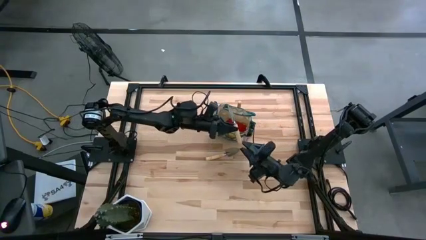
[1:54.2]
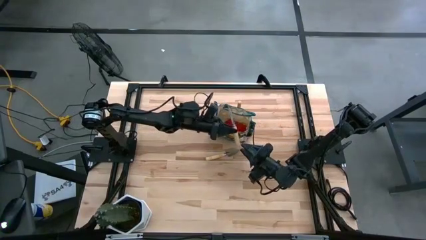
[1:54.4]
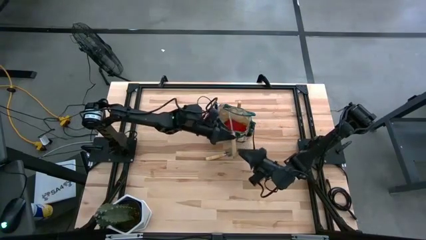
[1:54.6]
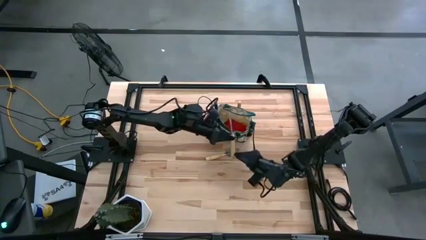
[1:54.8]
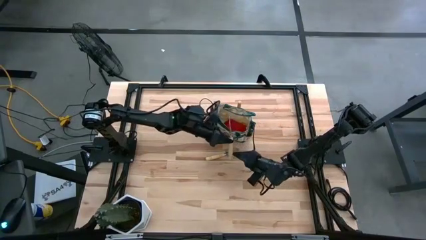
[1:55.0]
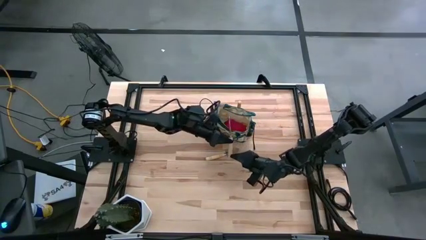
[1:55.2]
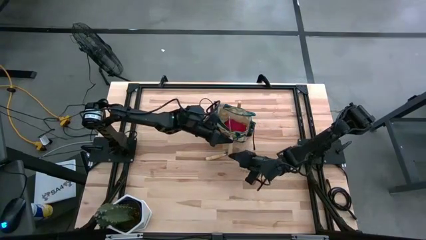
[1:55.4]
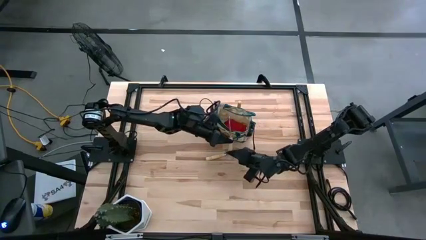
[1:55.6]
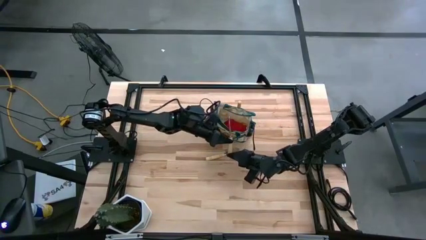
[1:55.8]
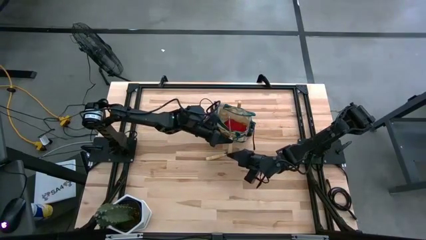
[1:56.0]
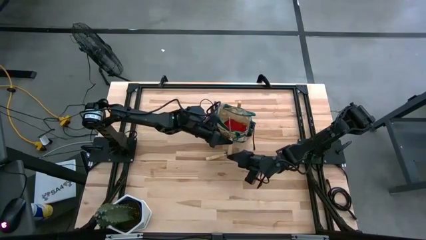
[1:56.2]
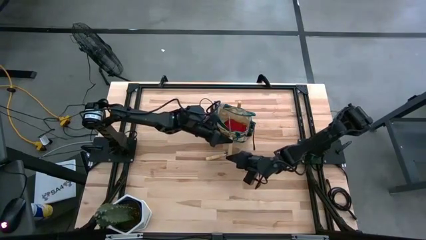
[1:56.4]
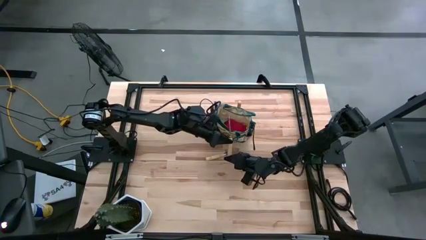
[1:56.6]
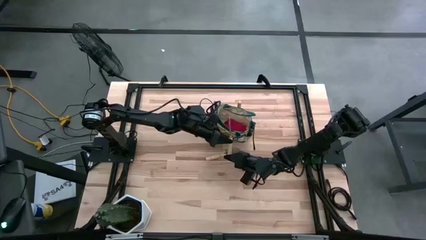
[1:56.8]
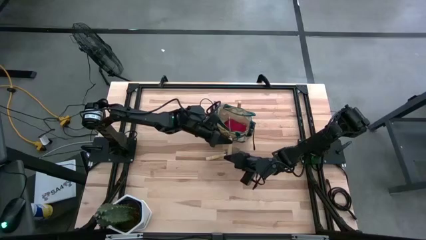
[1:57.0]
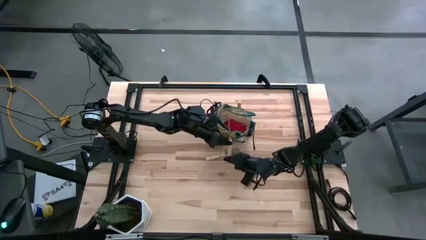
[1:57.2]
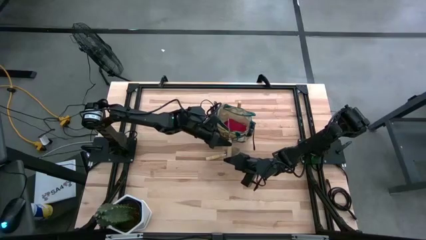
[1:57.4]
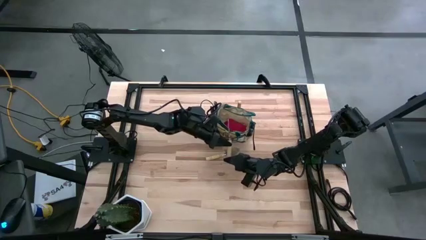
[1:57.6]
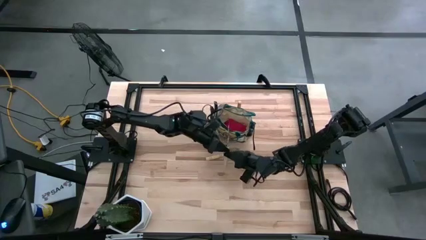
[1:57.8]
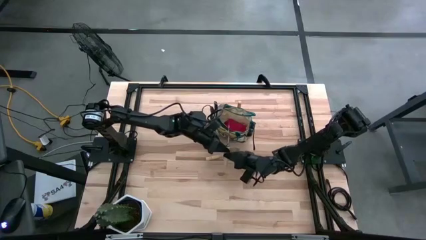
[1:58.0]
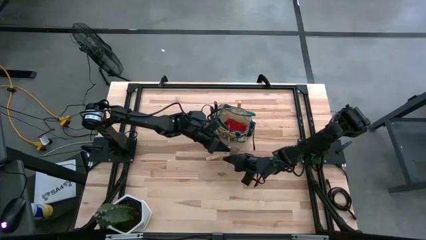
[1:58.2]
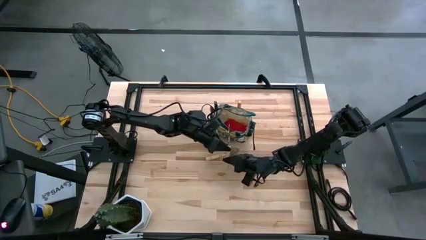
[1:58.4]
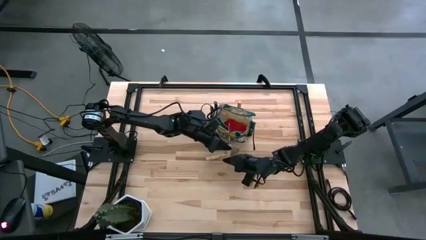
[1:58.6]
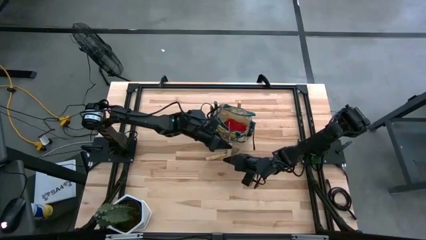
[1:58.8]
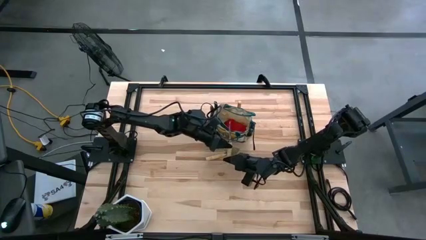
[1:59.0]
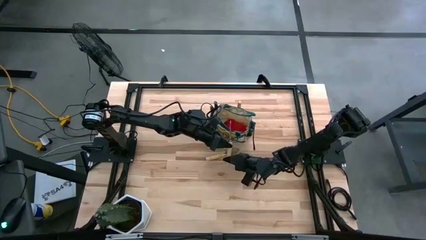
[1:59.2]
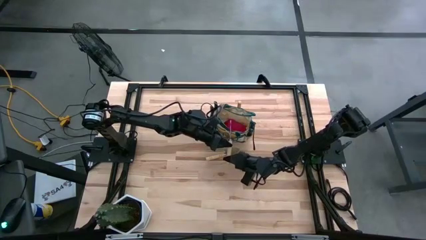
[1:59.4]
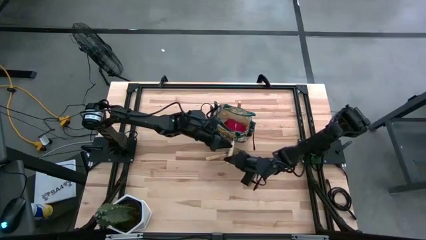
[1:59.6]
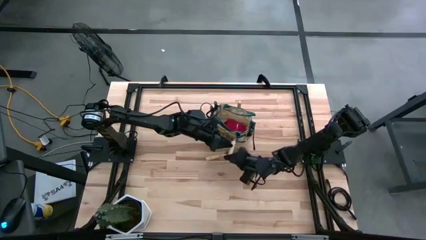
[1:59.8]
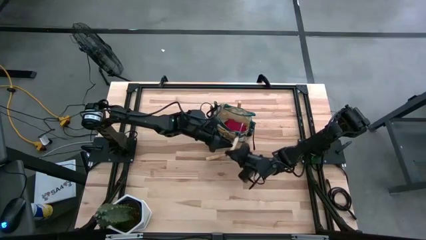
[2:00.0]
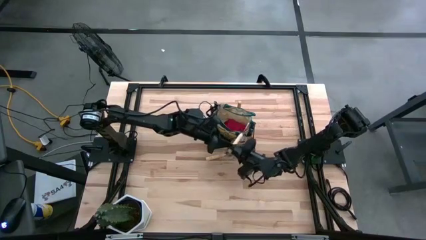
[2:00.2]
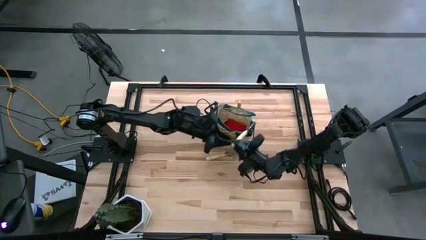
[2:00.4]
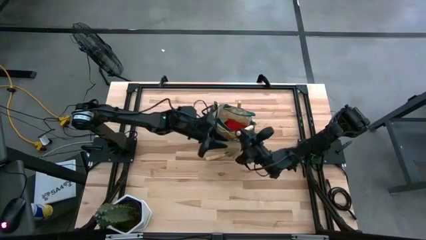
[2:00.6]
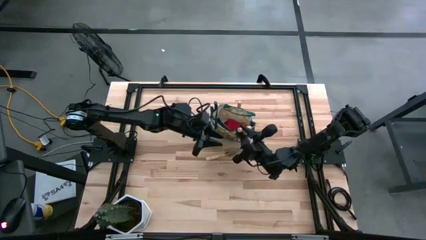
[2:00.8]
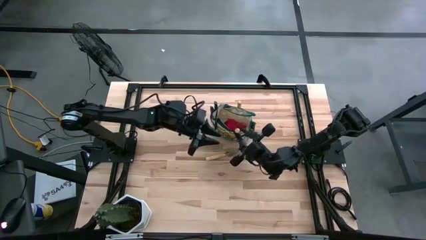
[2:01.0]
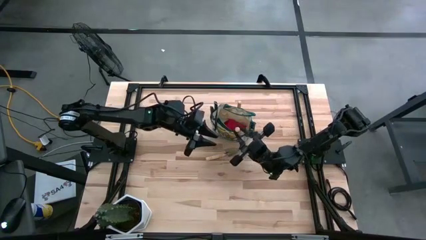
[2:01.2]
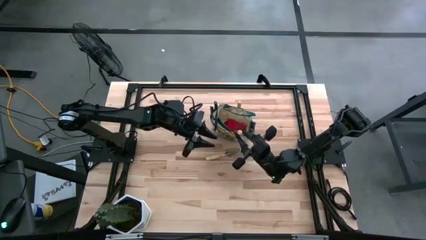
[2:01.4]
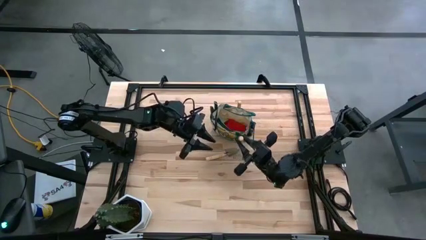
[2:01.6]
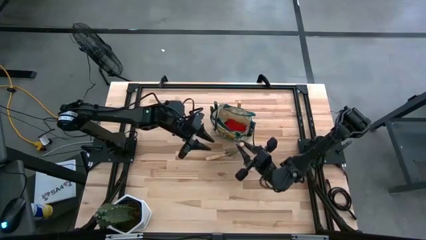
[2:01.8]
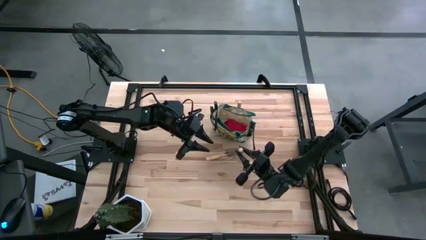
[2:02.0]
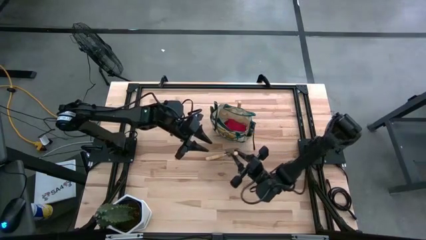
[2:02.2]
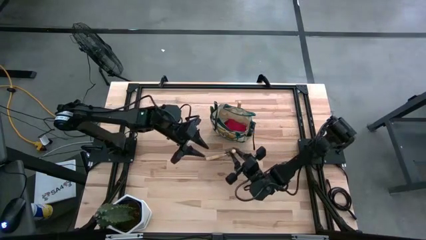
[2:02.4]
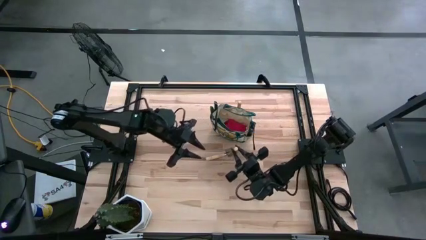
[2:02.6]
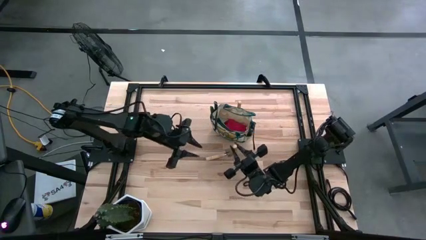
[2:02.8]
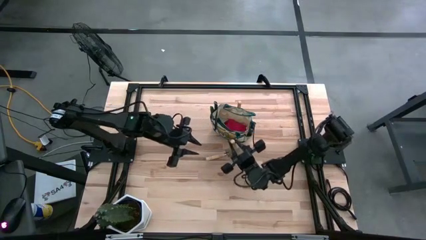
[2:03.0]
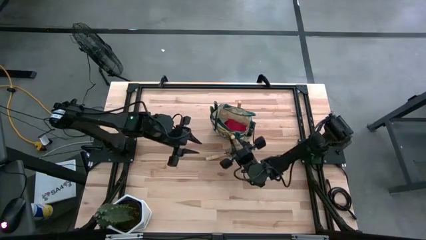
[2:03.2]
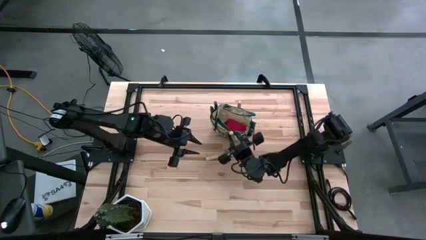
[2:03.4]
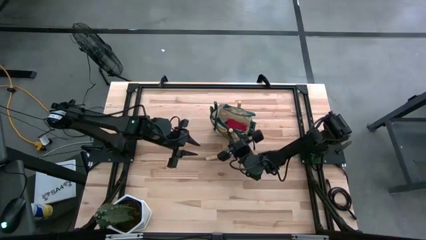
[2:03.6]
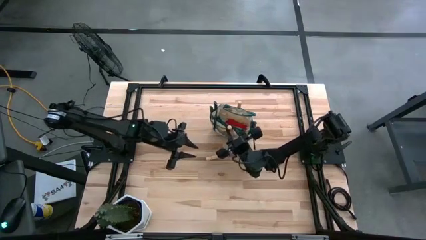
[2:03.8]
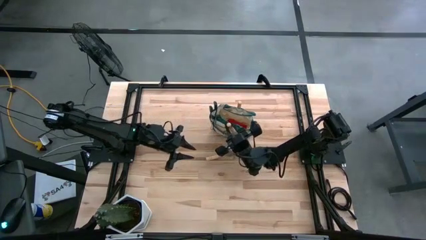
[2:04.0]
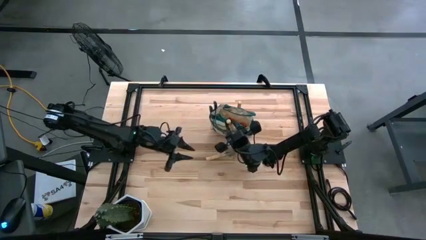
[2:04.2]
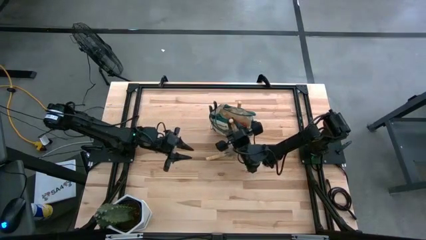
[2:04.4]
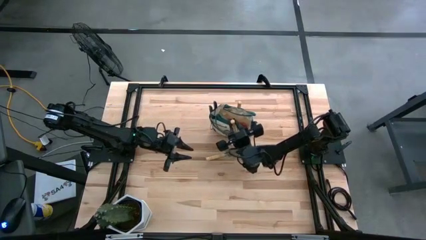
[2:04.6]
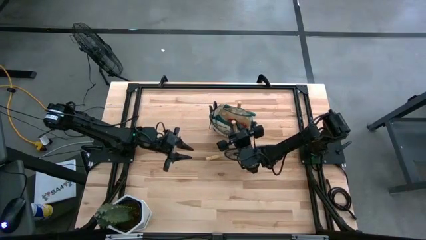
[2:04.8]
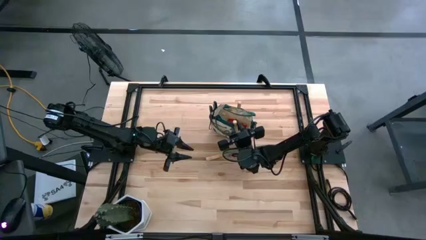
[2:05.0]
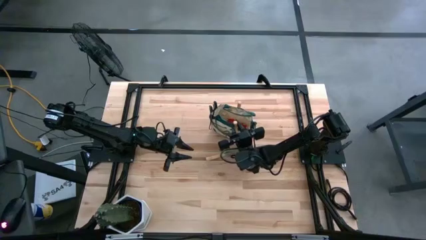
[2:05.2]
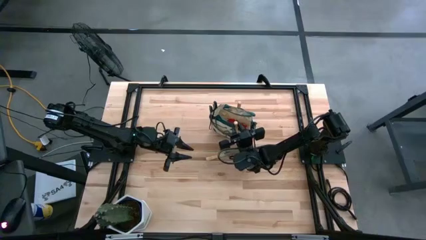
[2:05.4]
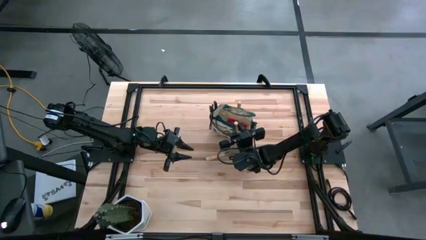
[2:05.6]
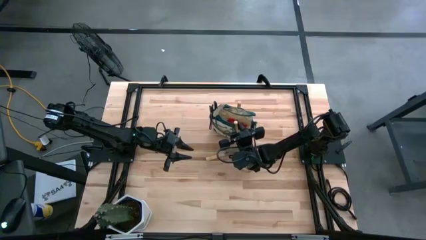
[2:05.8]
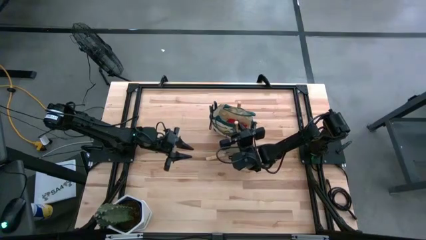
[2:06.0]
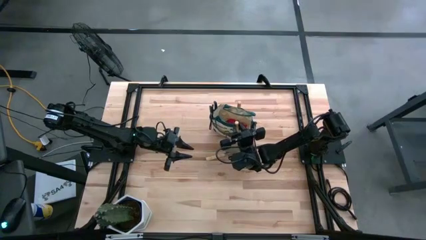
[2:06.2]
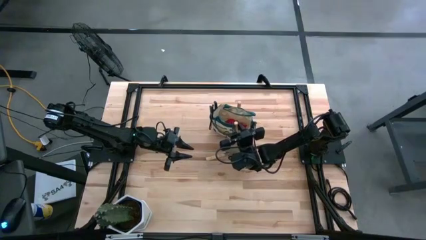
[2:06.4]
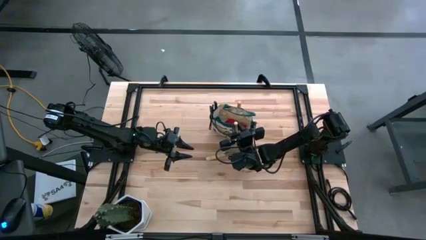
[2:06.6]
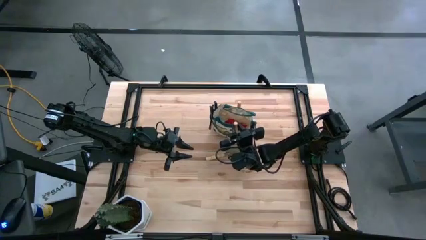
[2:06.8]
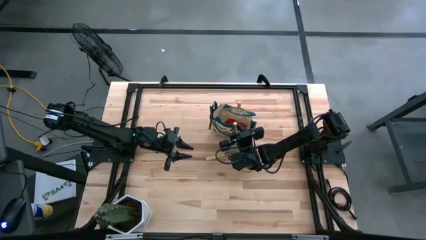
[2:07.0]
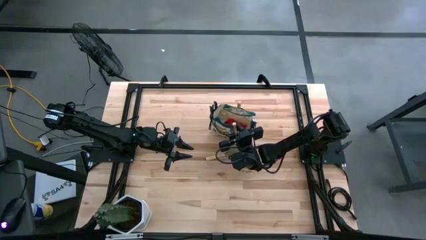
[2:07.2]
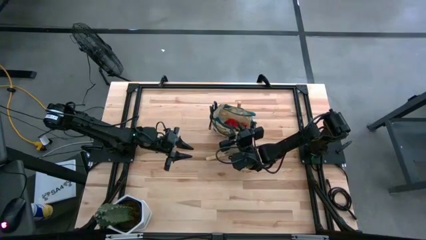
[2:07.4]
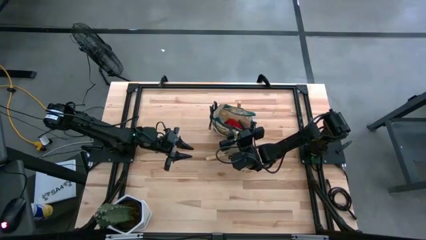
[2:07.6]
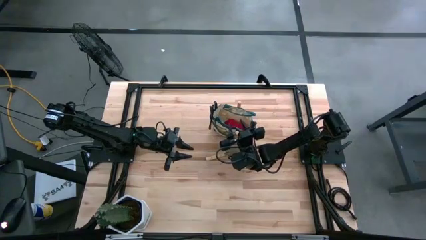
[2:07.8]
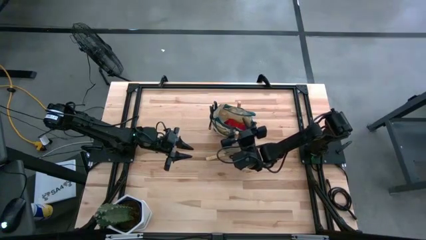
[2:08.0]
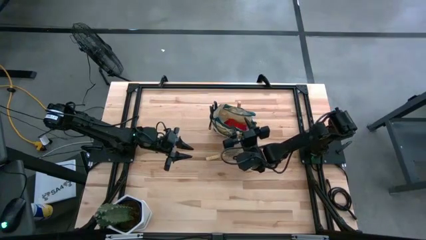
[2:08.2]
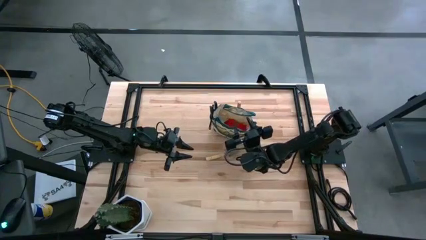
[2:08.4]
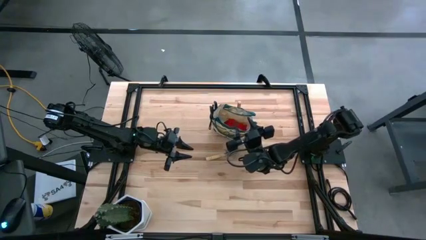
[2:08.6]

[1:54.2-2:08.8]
Task: Pick & Place Garden tools in Gardening bag
Put the left brown trowel into the gardening bag

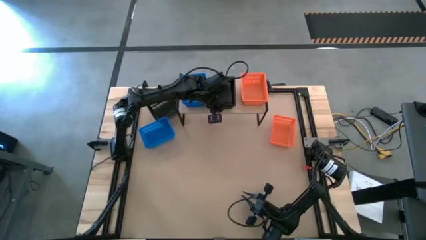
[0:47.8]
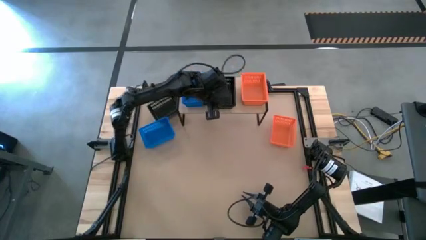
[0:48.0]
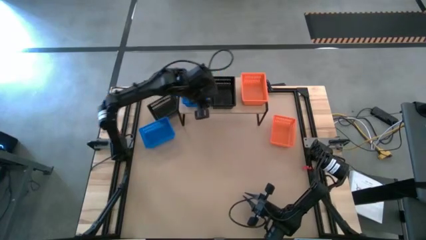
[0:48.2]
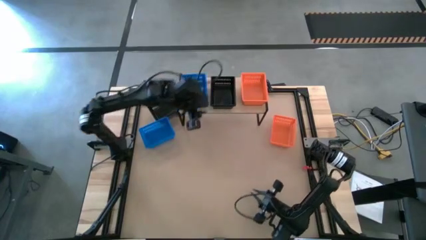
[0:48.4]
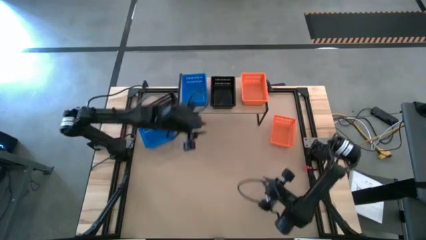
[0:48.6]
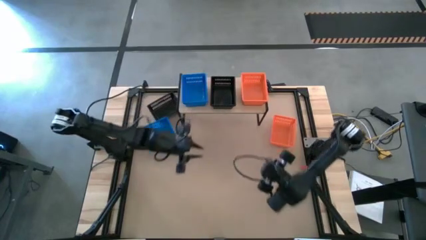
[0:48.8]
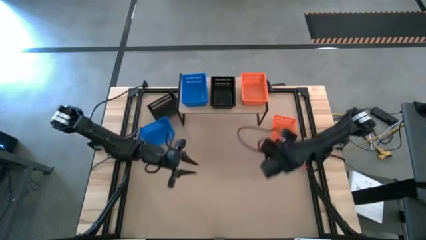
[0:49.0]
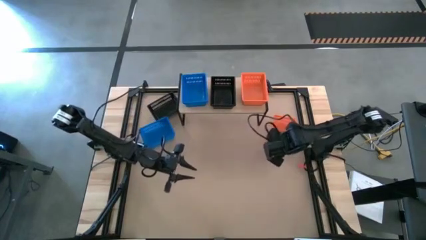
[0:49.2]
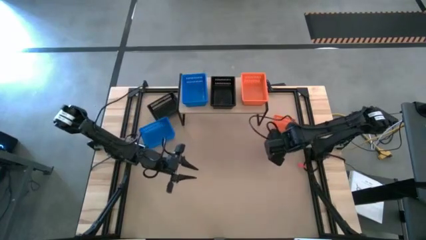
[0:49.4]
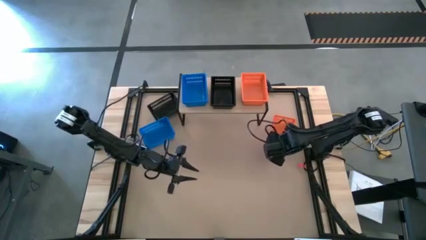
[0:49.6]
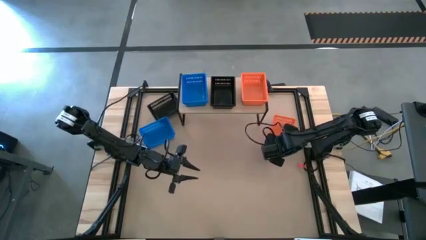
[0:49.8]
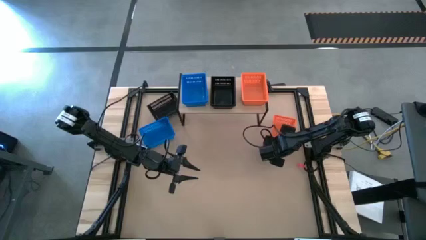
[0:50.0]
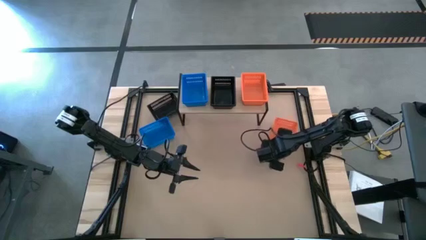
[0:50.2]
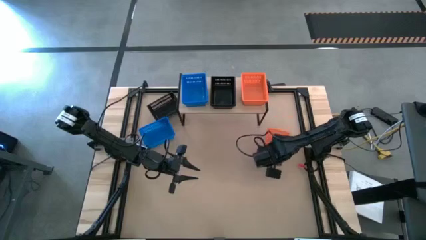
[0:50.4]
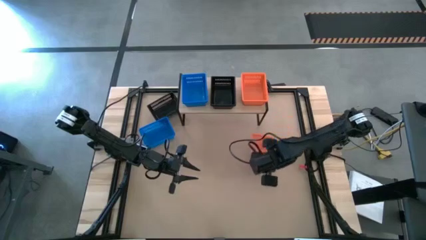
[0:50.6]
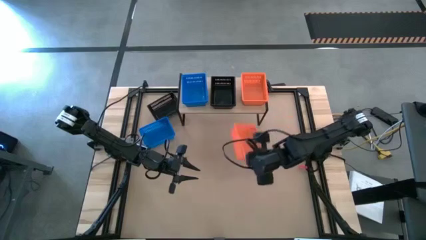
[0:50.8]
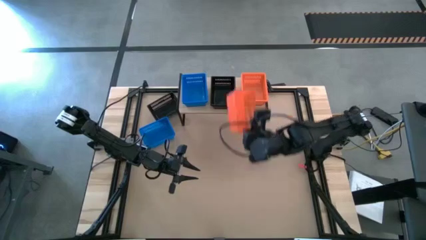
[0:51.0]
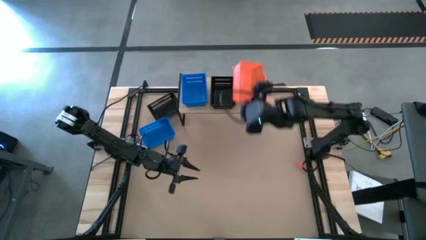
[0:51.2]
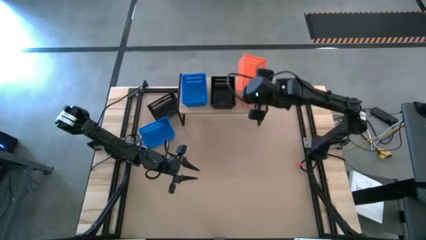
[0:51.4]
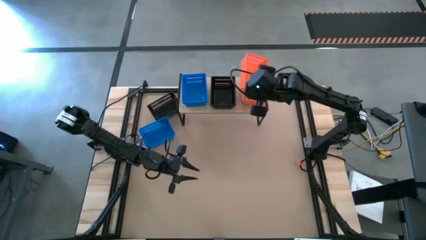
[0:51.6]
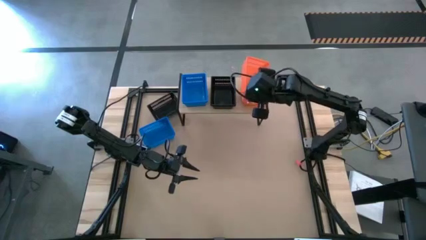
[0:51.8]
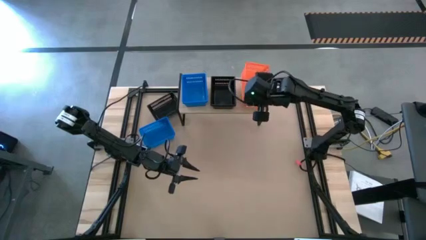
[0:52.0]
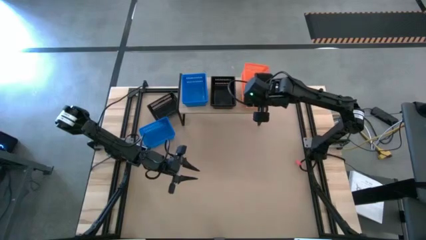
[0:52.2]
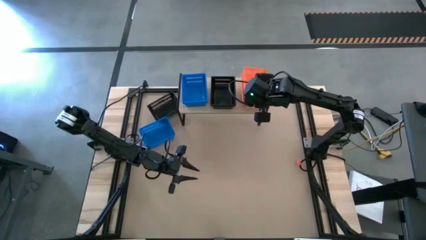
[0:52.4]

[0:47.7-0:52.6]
Task: Stack baskets on shelf by color
Stack the orange basket on the orange basket on the shelf
